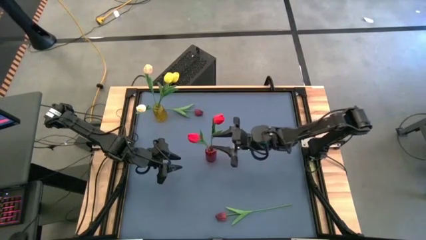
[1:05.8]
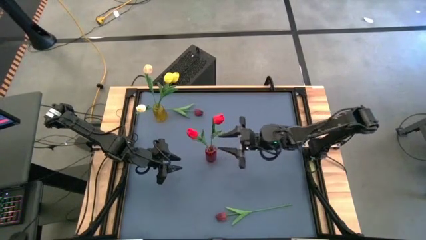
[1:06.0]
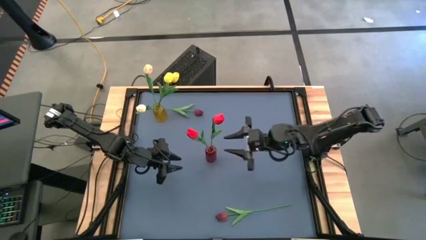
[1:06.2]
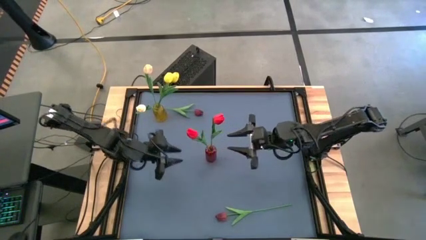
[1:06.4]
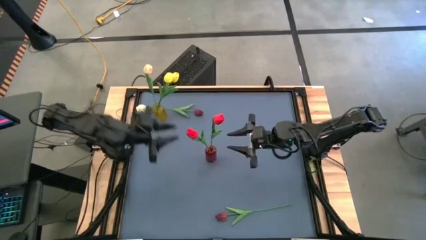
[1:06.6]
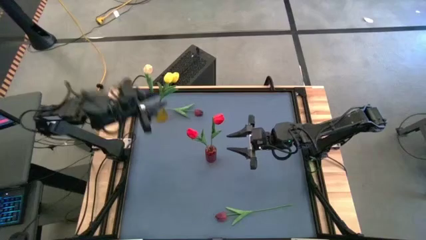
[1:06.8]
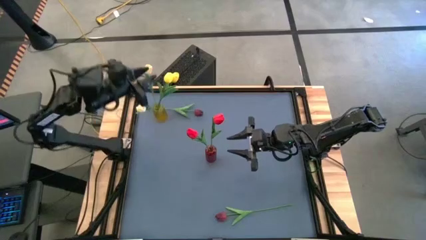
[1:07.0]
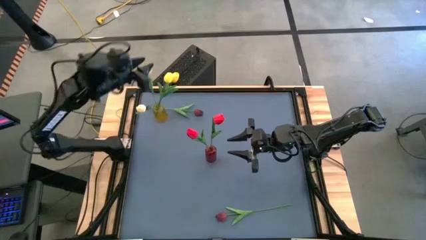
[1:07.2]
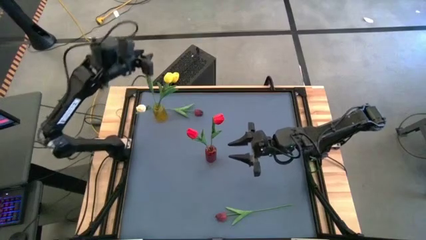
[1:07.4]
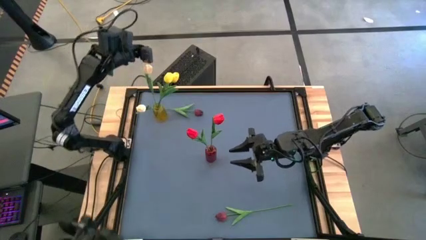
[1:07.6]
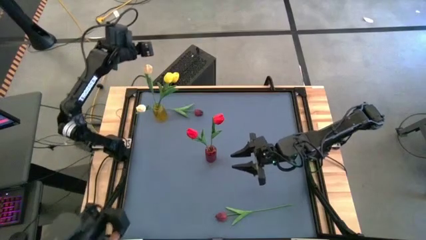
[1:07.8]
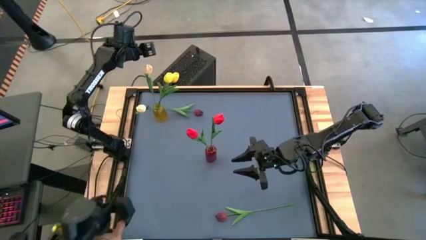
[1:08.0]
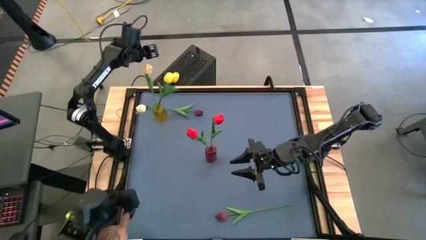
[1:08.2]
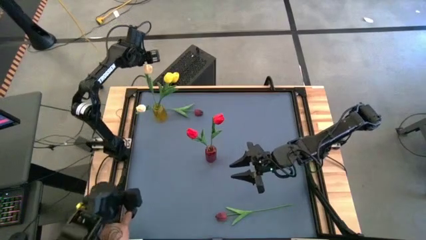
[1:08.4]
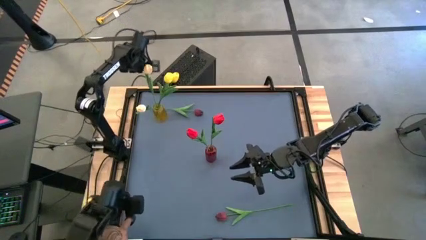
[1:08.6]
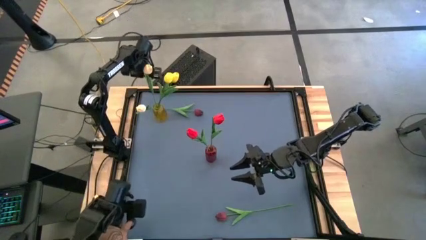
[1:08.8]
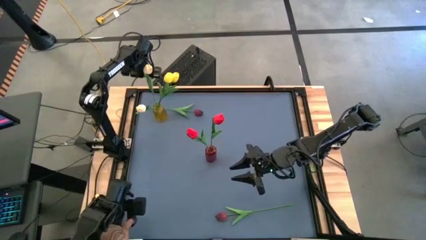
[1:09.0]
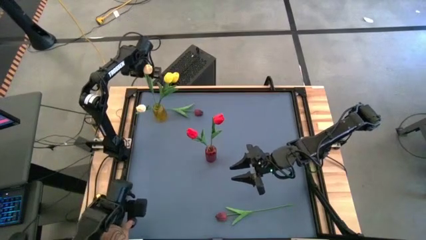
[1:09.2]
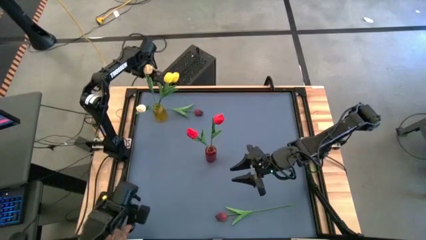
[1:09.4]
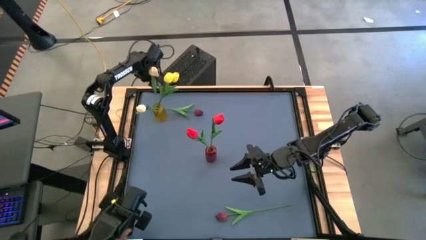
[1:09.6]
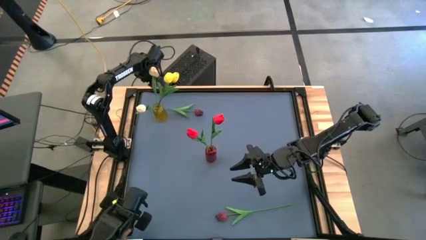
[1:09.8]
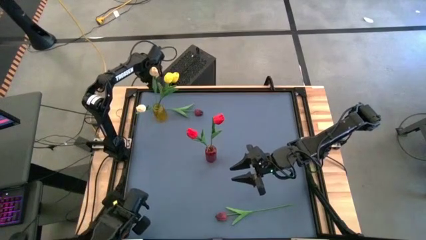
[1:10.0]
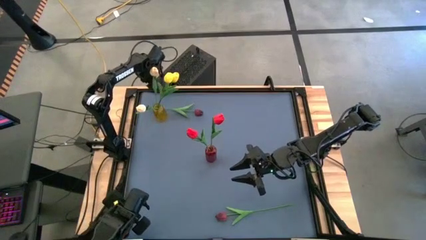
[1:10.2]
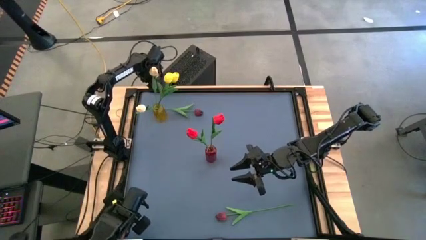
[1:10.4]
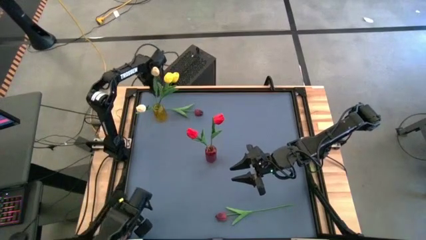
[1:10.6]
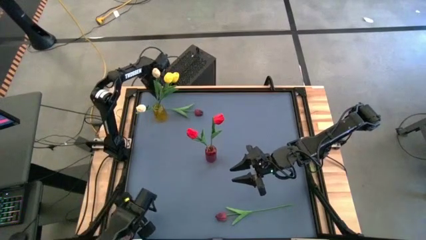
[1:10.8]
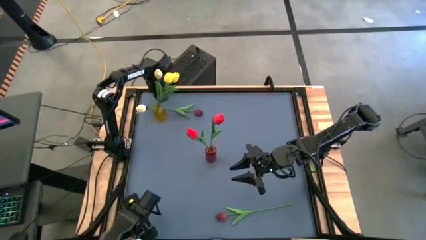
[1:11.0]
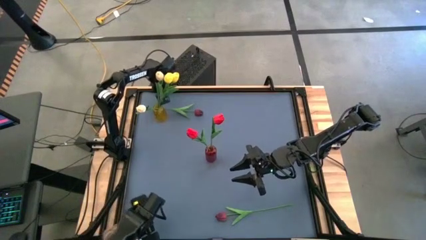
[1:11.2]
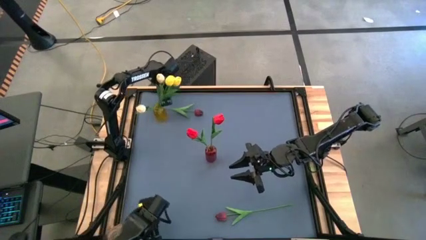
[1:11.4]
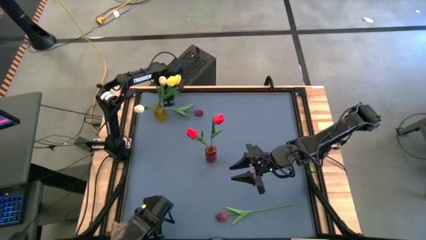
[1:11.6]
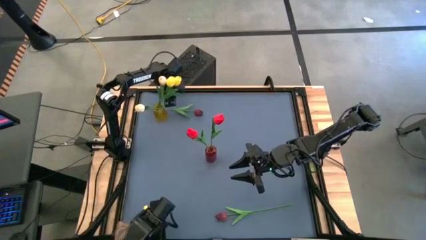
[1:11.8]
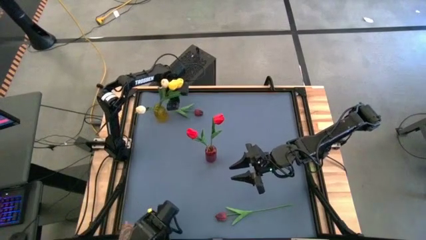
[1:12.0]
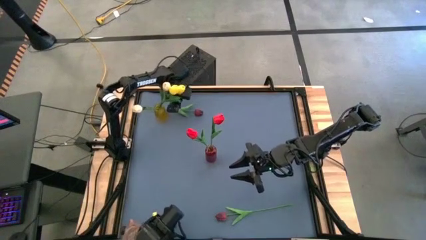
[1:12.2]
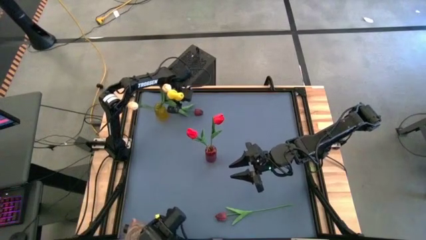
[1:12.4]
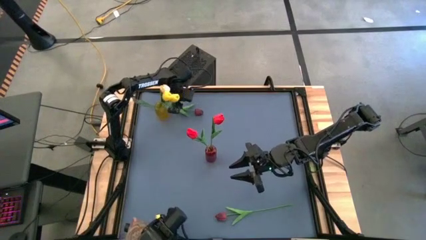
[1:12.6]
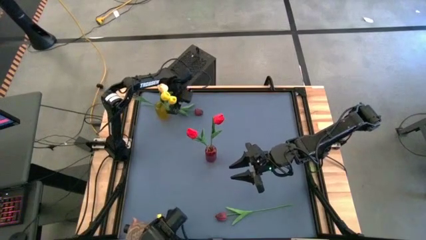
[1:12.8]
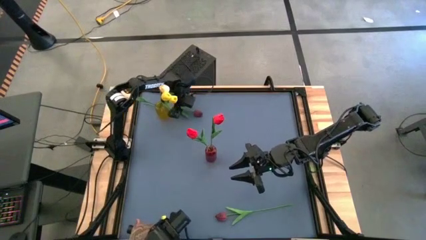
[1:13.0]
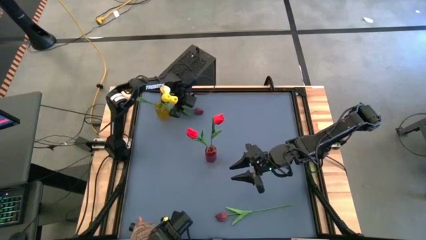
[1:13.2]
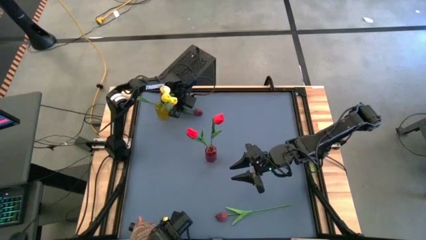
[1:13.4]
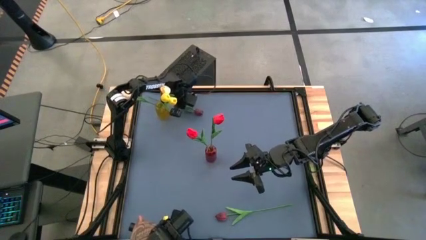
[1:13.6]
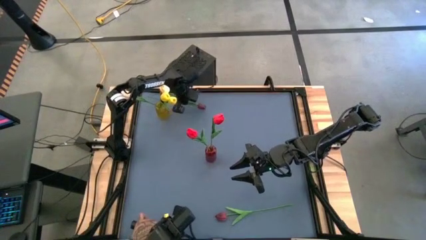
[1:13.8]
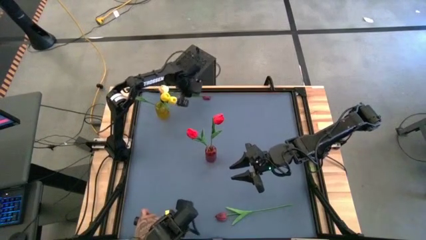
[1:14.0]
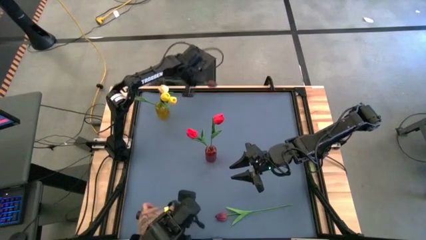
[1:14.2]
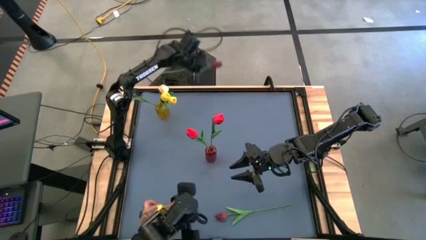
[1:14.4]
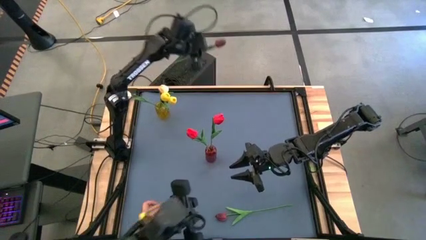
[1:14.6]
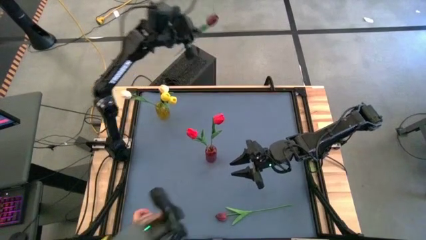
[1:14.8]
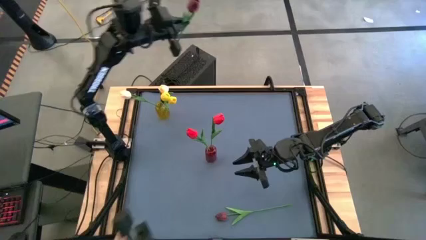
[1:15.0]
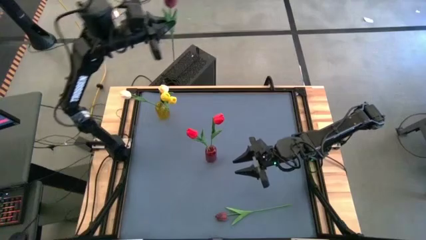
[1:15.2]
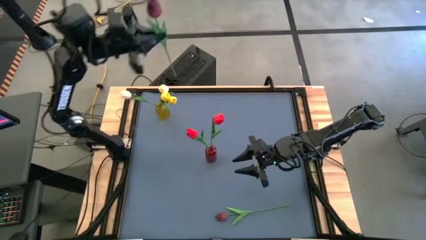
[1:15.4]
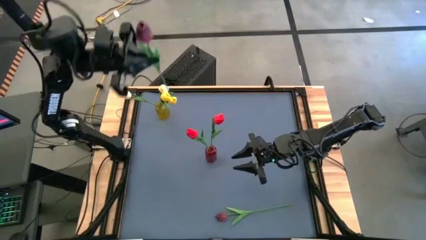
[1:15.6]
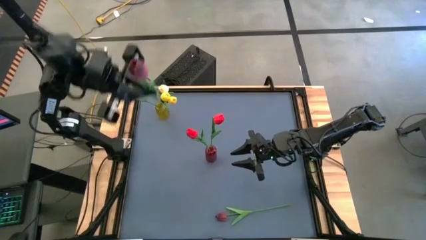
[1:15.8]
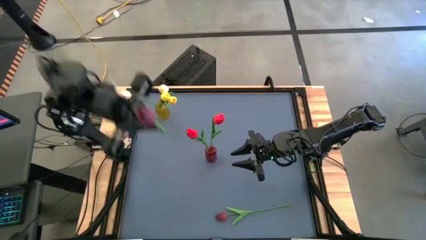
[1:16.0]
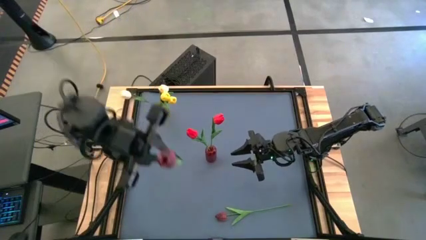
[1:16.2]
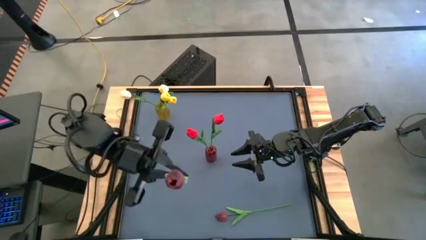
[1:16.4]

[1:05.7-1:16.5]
Task: Sort flowers into vase by color
Put the top red flower into the red vase

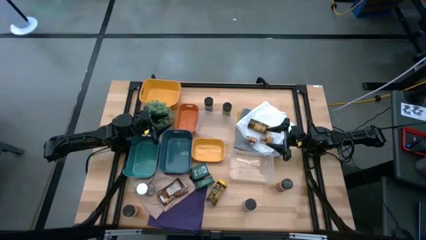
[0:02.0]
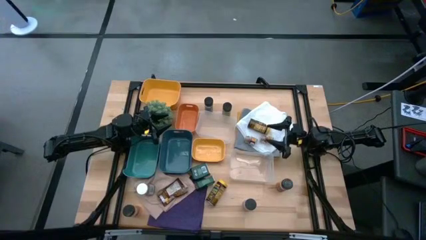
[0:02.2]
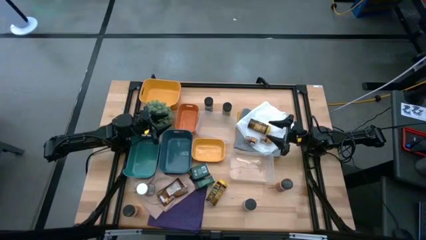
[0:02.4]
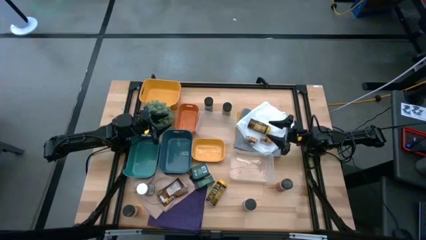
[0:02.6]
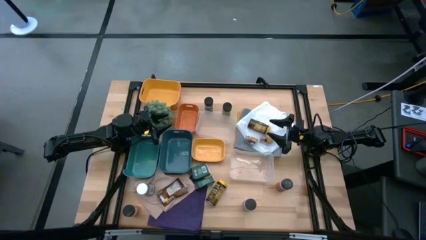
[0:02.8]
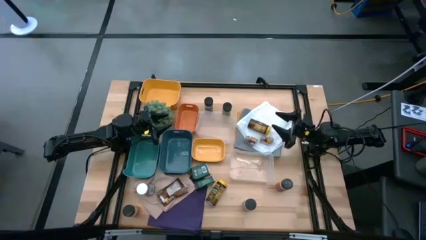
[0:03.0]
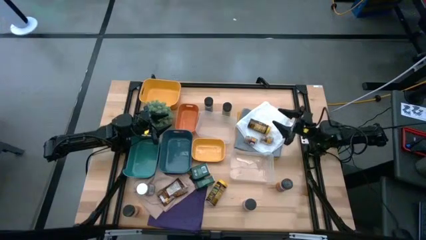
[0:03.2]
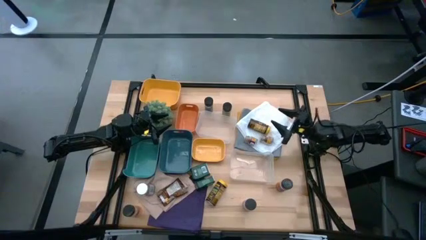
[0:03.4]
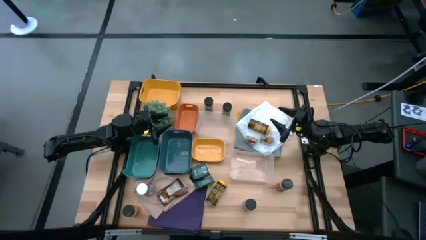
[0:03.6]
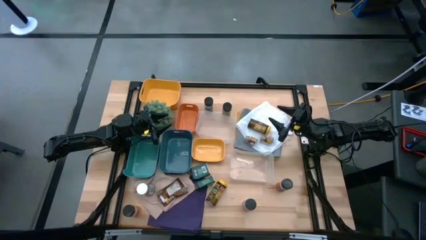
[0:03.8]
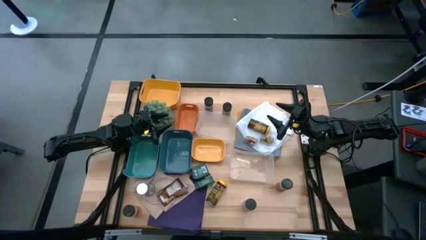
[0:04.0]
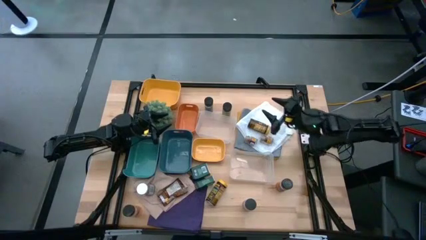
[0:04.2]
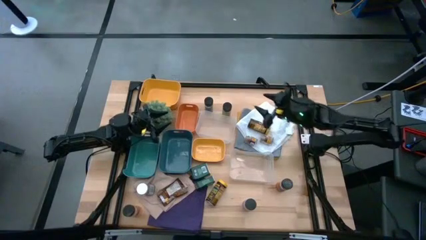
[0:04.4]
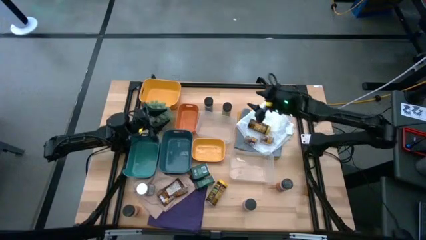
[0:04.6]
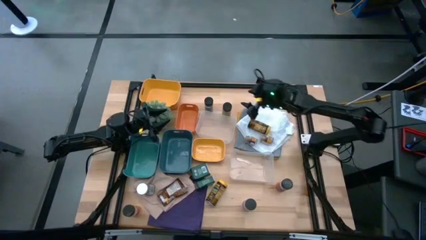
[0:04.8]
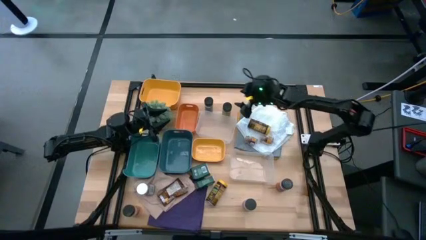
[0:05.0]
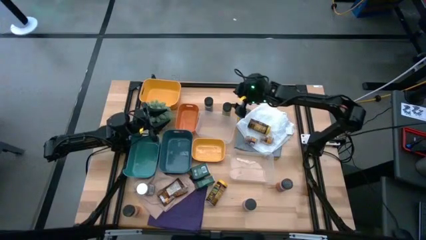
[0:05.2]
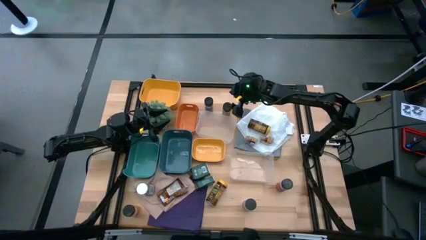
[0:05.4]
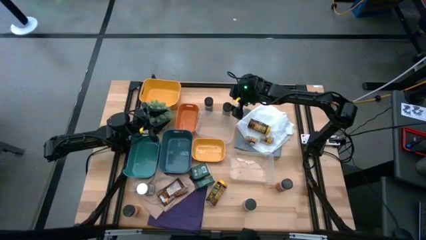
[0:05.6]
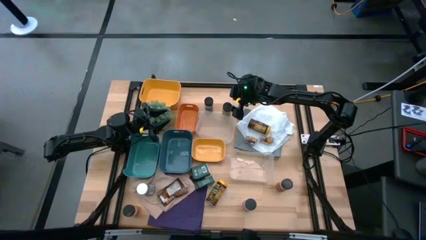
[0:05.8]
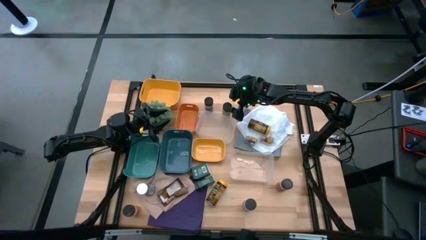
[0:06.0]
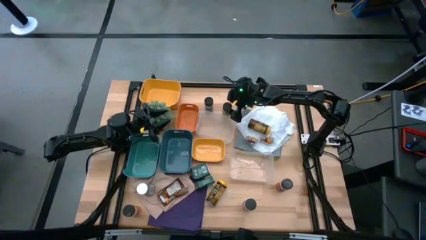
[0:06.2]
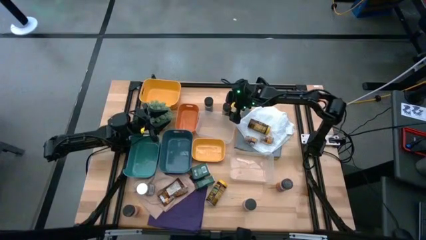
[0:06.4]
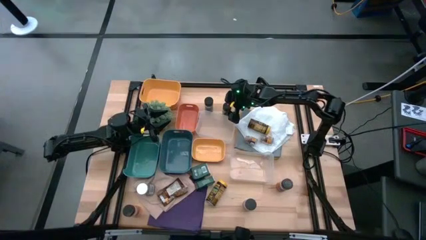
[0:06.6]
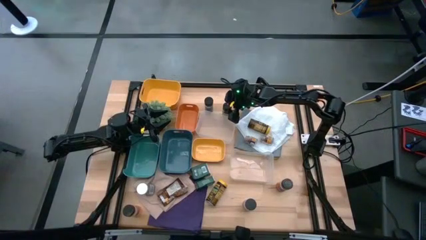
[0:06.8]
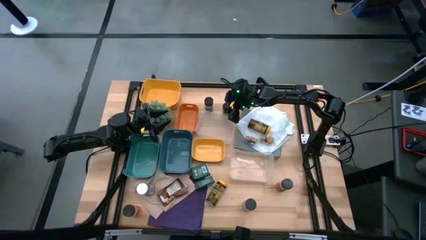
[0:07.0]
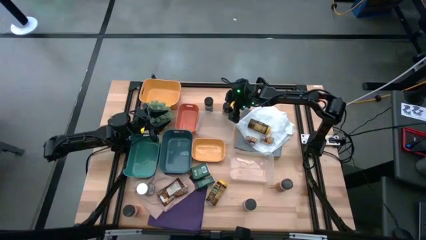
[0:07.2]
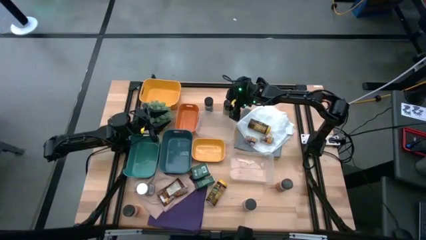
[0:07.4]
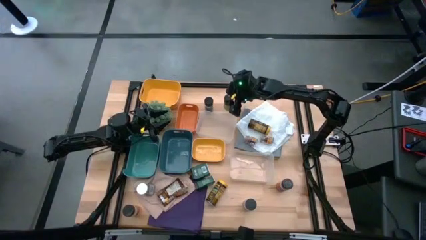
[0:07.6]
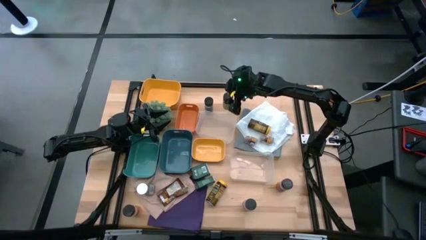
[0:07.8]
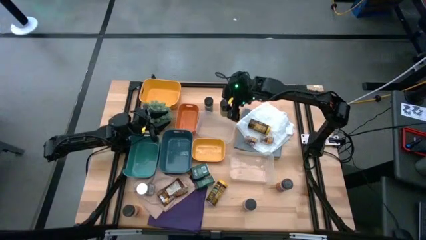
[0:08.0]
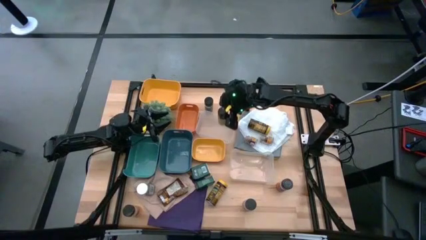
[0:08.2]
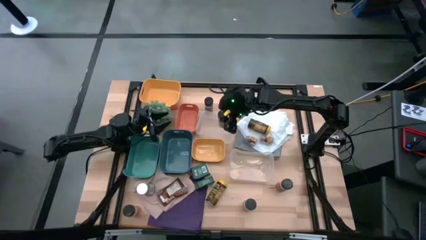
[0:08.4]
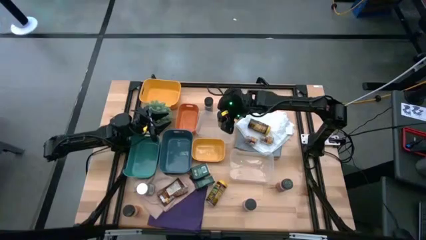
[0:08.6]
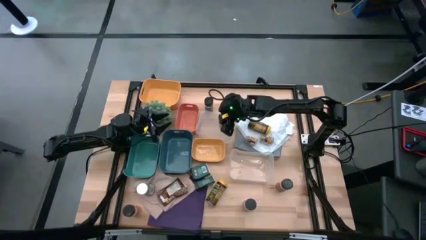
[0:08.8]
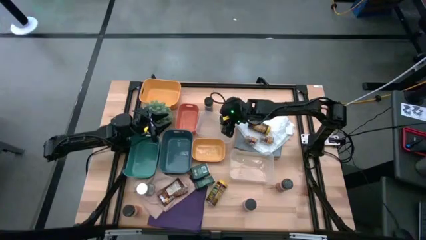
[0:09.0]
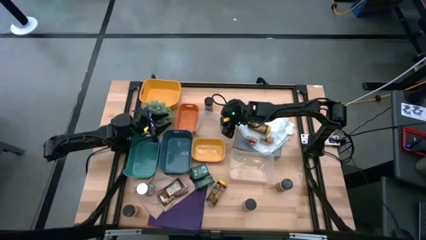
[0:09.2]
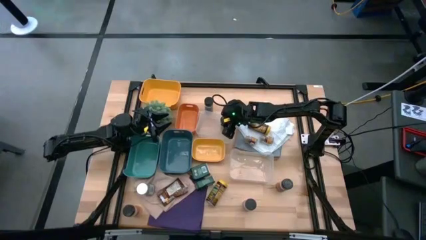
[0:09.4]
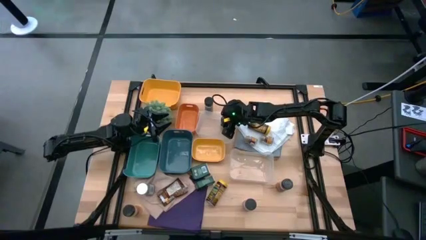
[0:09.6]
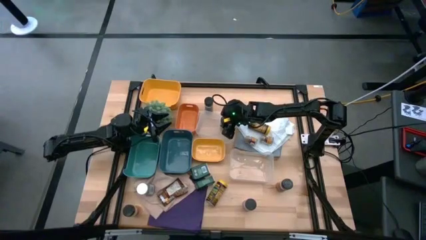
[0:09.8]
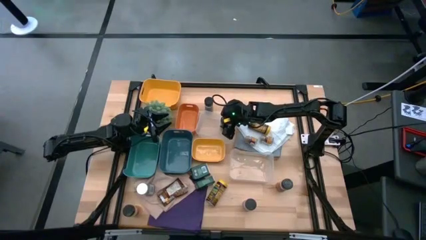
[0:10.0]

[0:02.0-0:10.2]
Task: Sort spices by type
Put the top right black seasoning bottle into the top transparent bin
